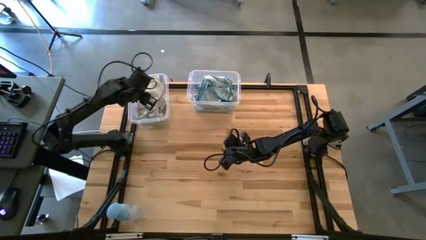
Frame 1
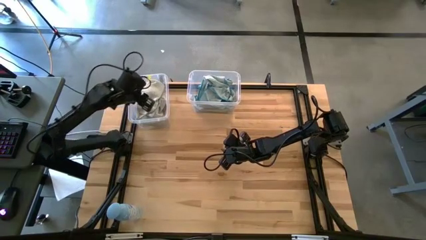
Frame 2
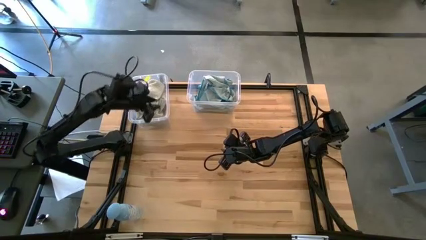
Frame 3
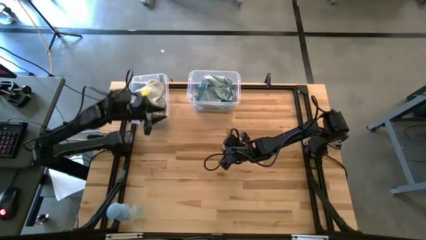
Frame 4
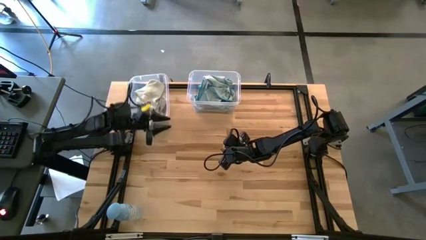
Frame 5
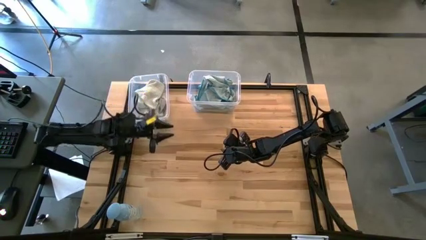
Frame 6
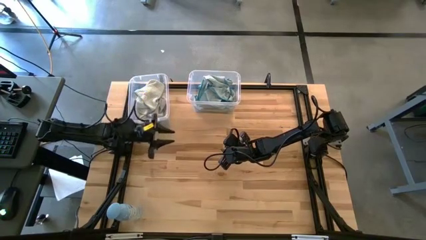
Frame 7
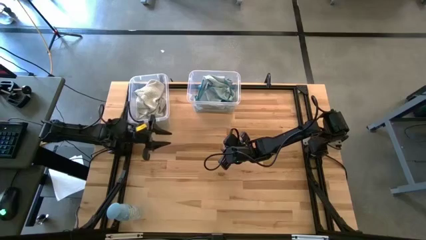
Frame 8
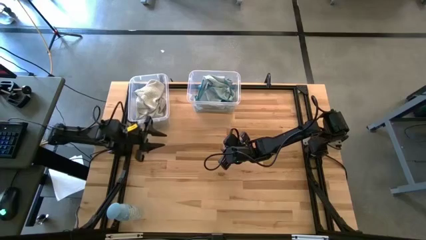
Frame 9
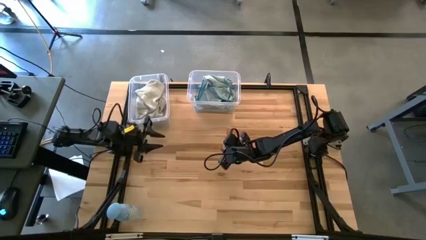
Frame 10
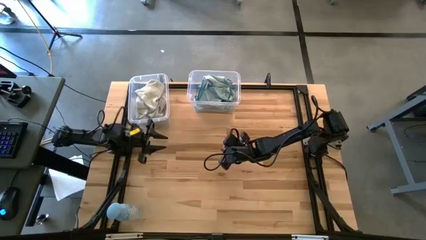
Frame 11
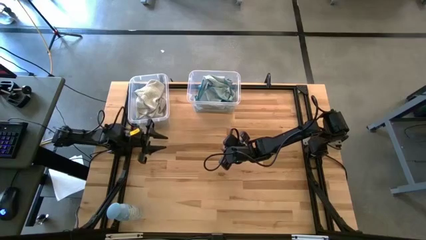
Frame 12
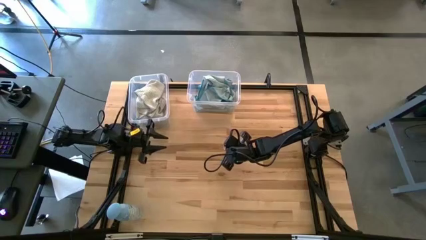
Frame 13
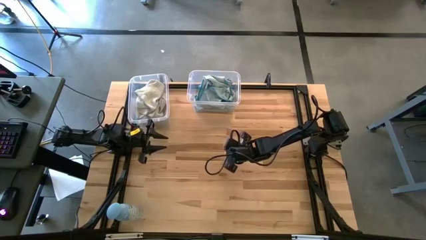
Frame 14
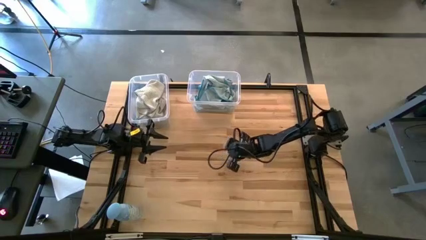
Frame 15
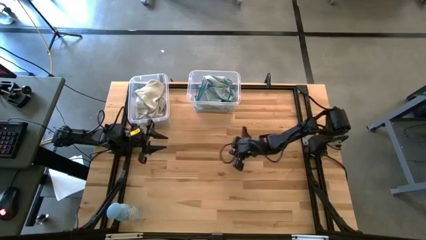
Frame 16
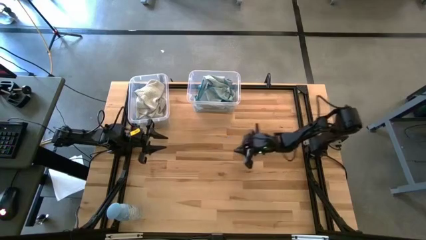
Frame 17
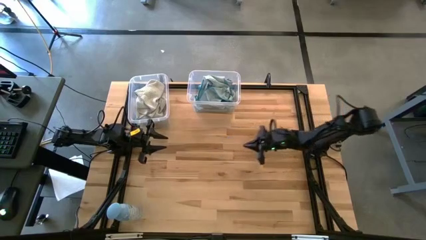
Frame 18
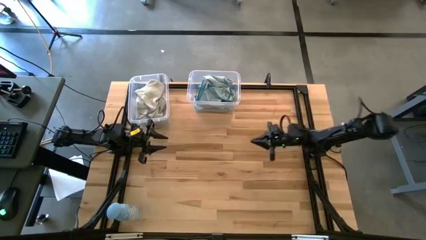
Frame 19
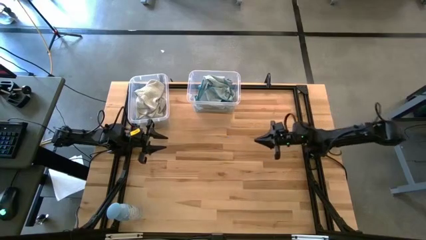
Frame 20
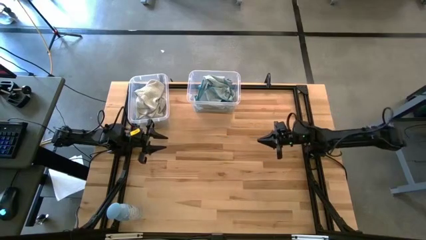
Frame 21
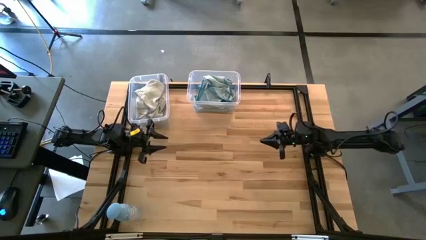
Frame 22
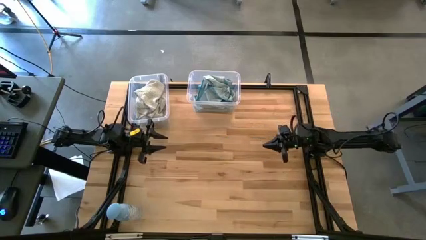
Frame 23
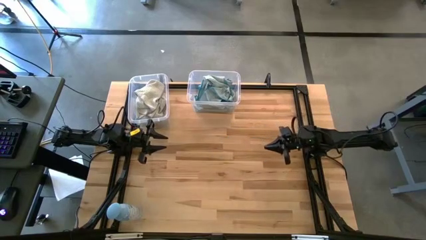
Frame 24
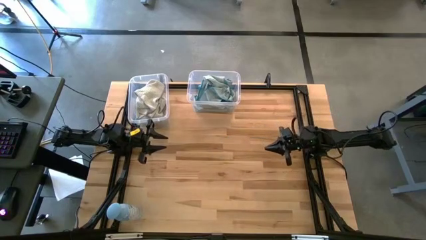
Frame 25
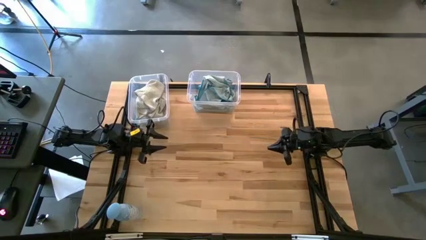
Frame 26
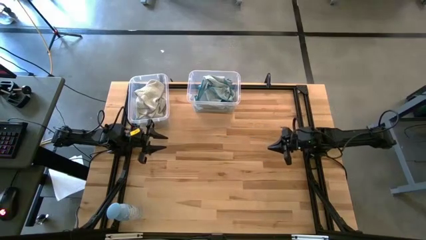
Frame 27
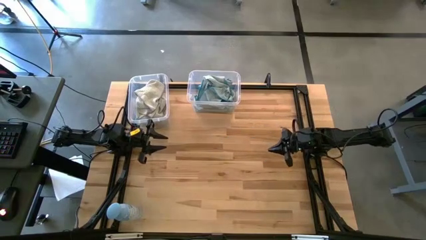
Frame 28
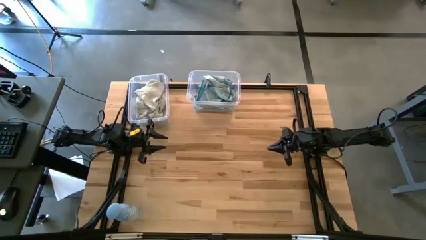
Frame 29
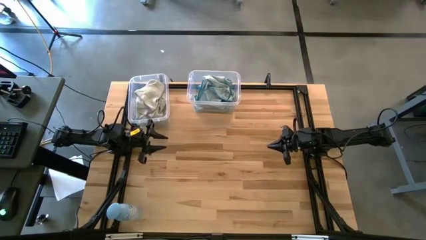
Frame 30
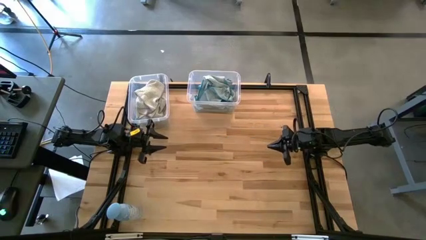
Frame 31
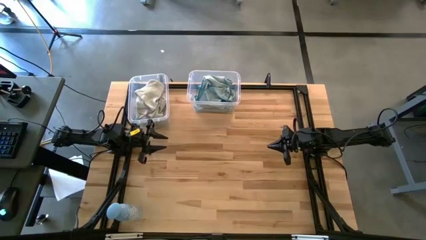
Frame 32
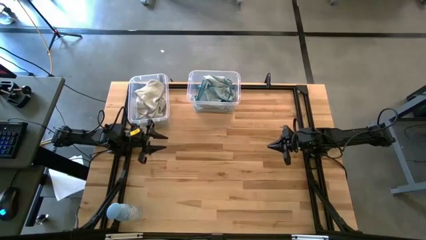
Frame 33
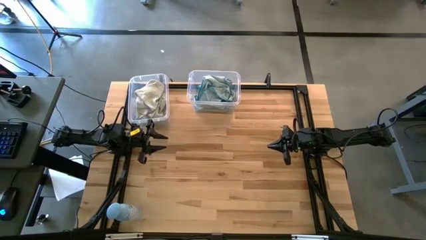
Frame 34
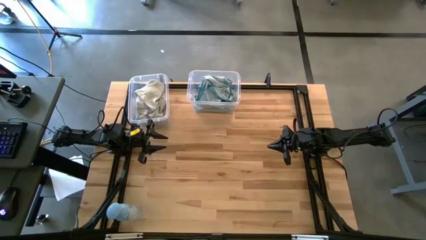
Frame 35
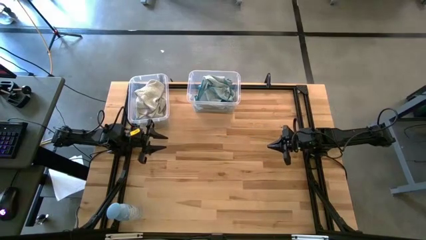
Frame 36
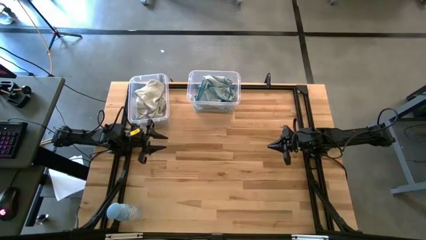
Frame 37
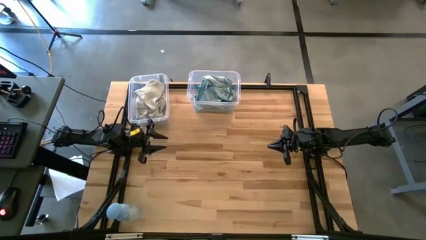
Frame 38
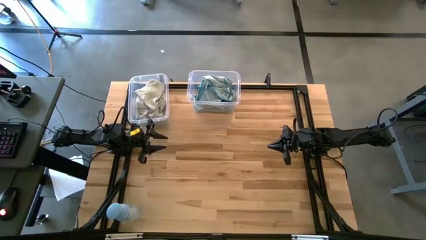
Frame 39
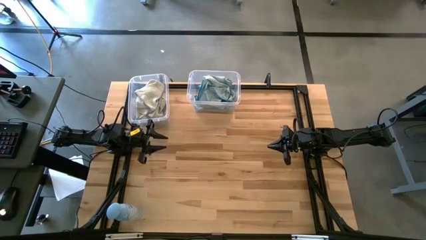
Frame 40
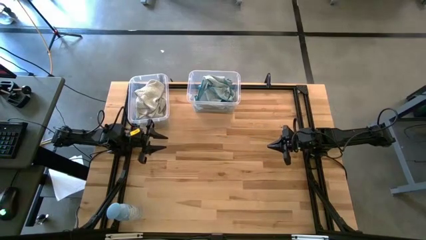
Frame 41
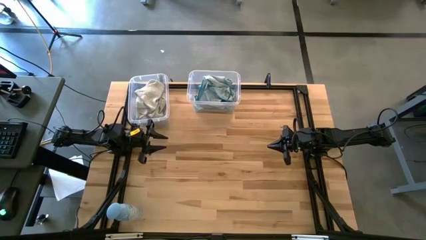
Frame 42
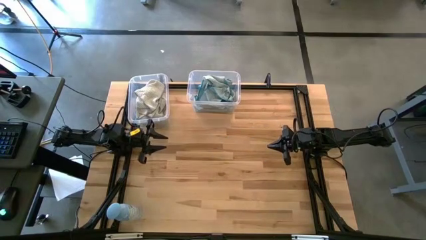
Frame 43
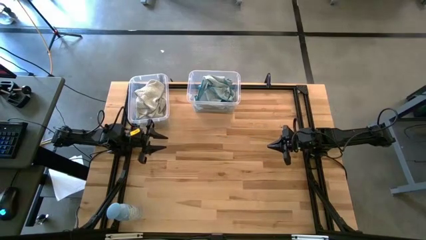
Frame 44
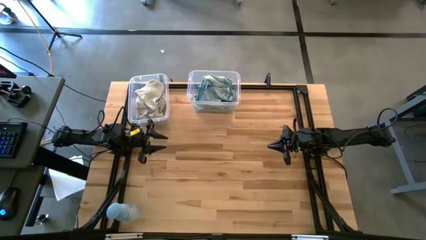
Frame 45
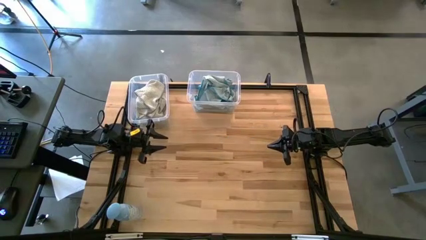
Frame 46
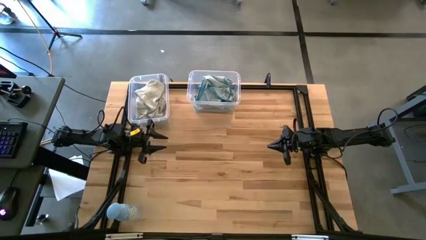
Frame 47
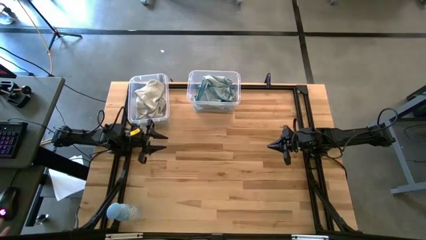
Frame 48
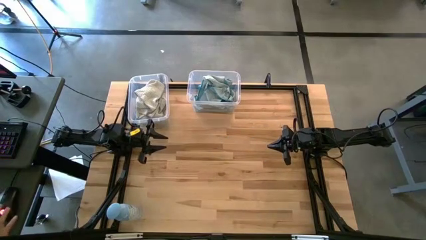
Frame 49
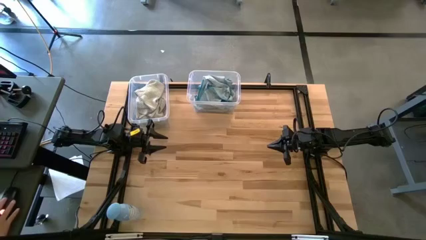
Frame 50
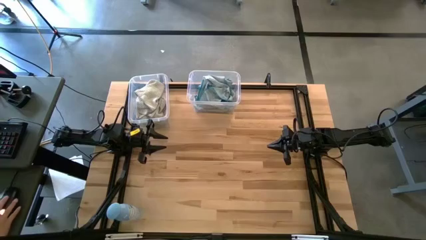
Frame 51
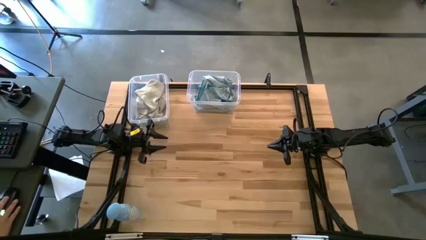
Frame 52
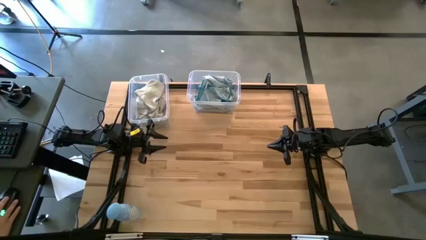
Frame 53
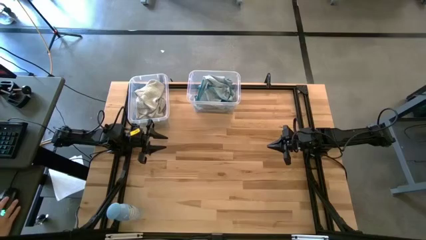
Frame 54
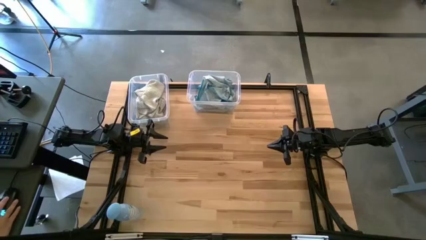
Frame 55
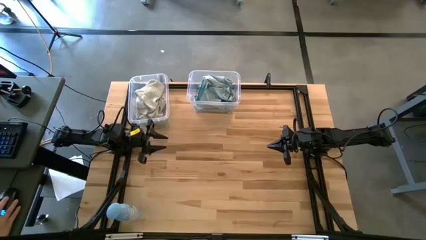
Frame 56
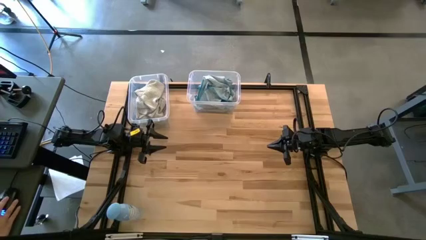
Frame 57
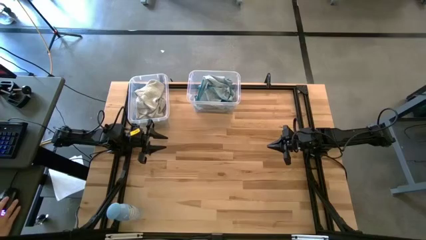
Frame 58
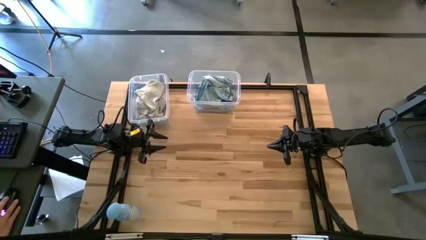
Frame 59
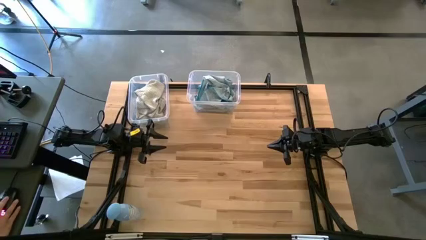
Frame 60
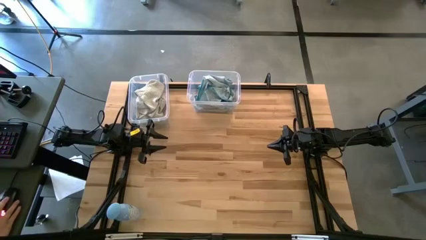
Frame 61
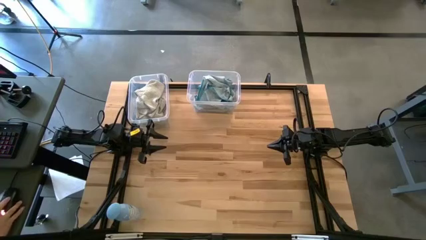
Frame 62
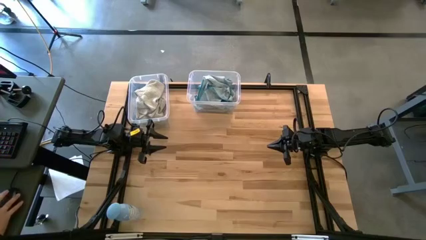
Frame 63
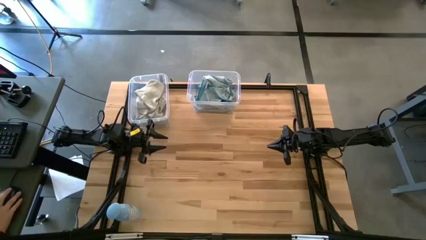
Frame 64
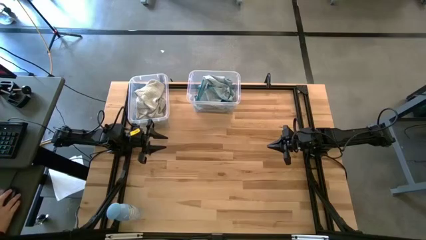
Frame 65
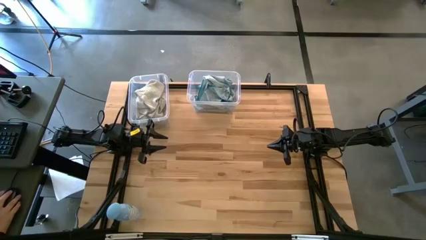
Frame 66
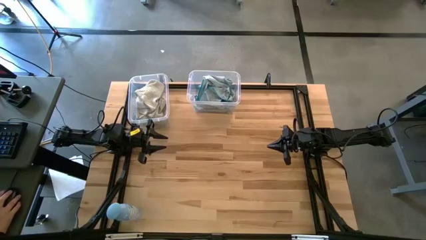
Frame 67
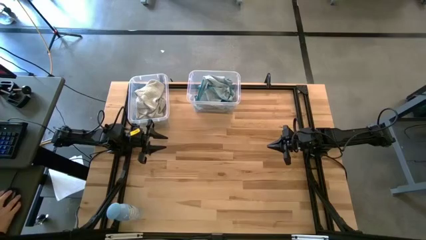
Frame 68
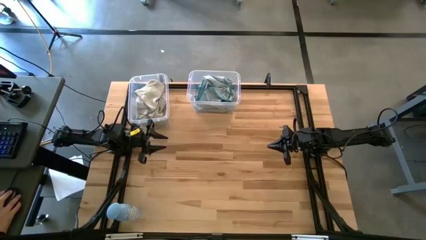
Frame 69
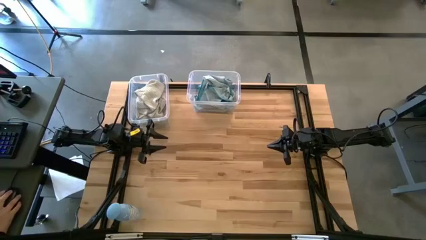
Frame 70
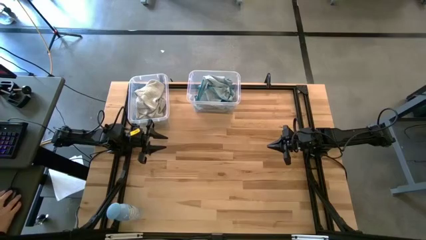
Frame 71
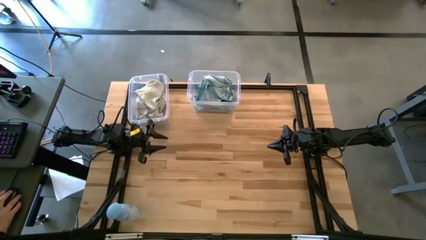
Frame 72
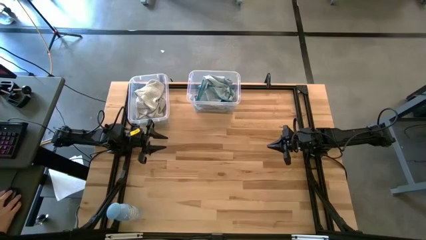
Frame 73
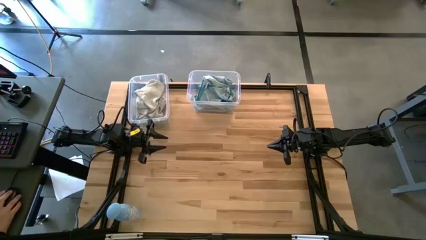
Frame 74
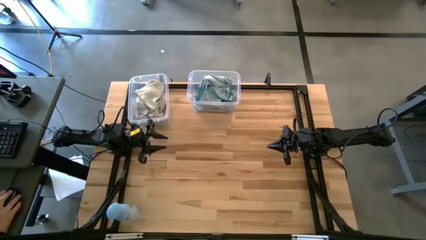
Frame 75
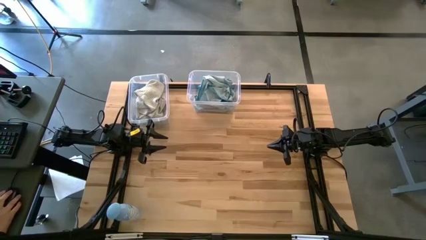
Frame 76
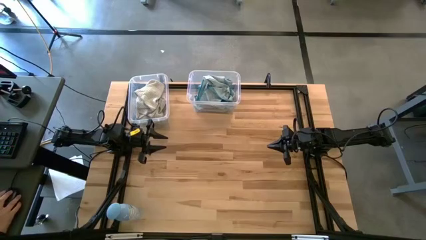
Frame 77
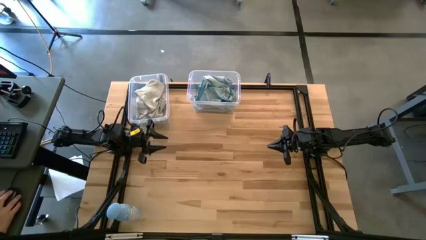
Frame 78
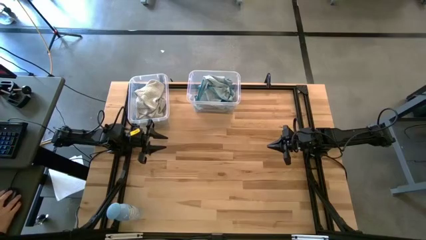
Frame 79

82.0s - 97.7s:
Task: Sort microfiber towel by color & place in baskets
Return to Home Position
